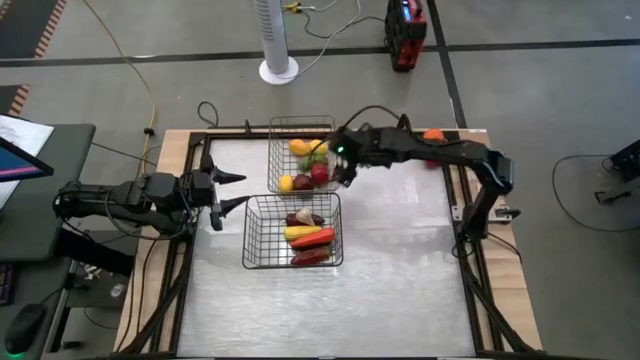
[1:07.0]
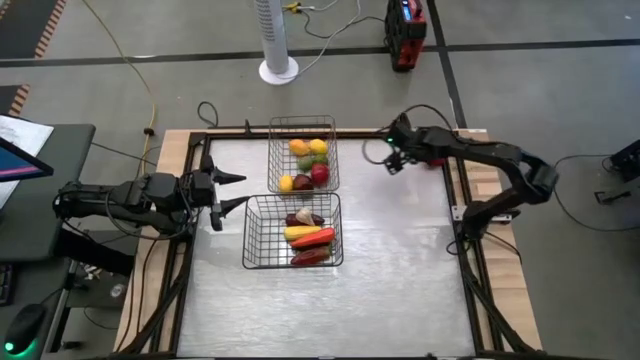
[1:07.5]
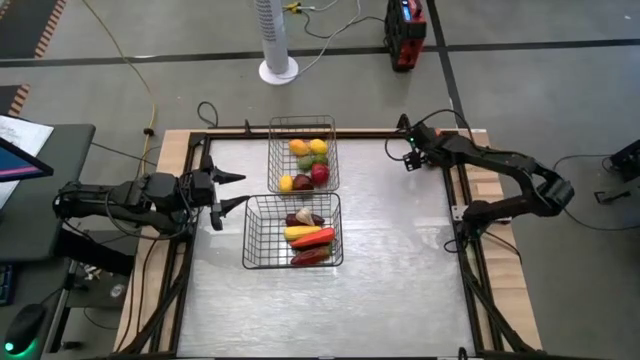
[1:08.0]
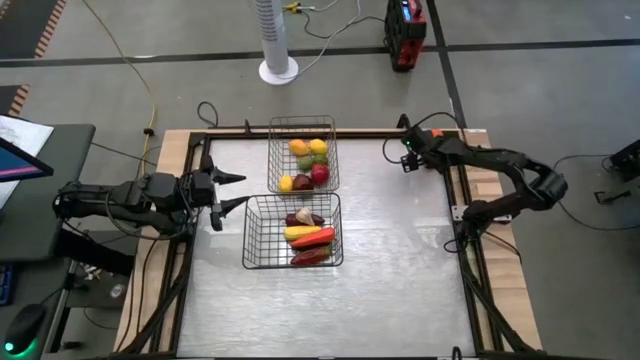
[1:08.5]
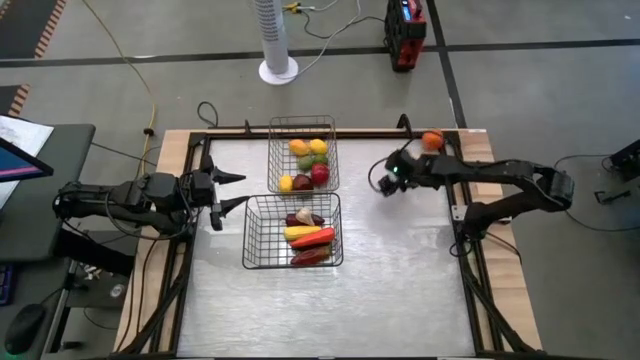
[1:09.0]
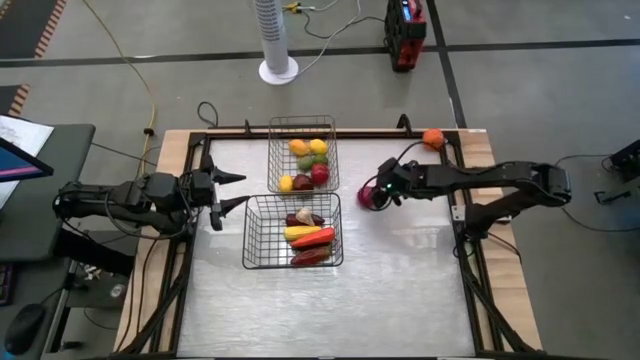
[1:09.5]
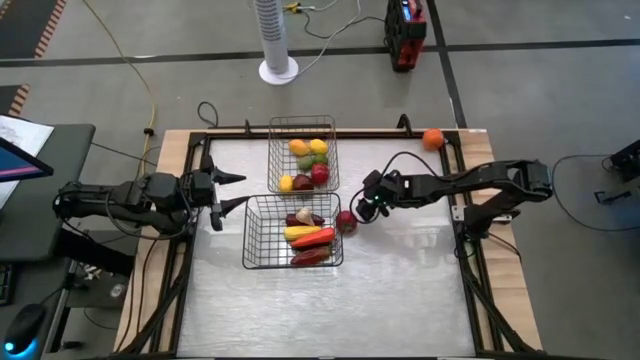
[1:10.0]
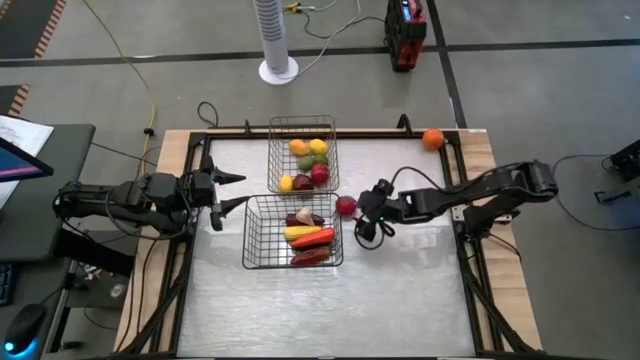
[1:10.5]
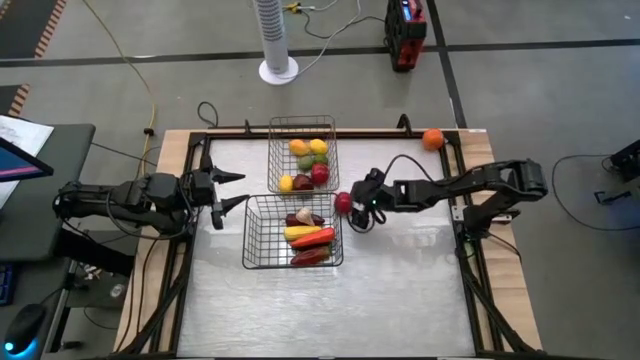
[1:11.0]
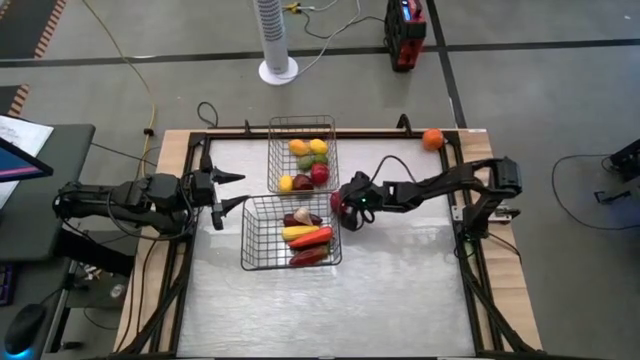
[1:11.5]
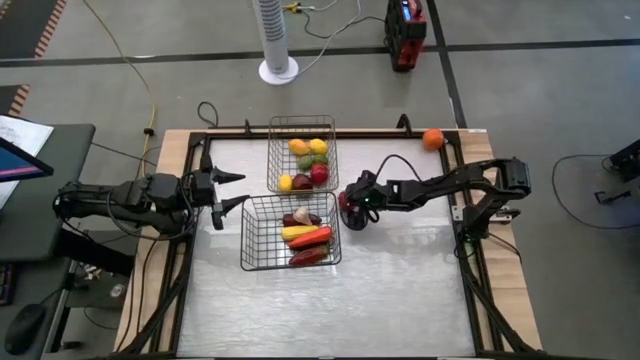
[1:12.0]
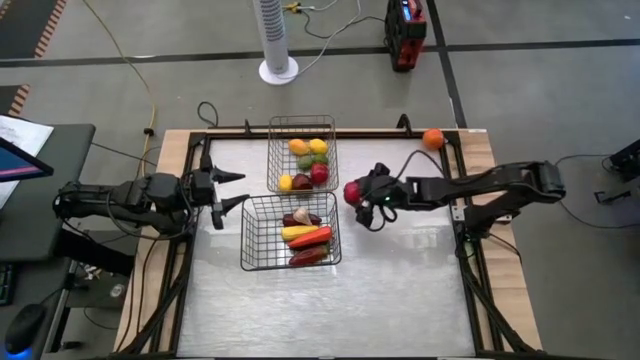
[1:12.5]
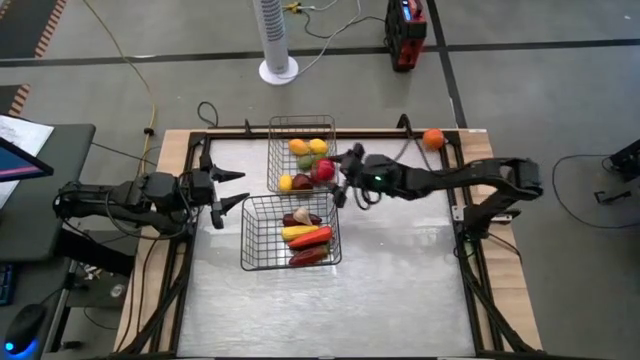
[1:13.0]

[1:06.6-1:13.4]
Task: Sort produce into baskets
Put the tomato into the gold wire basket

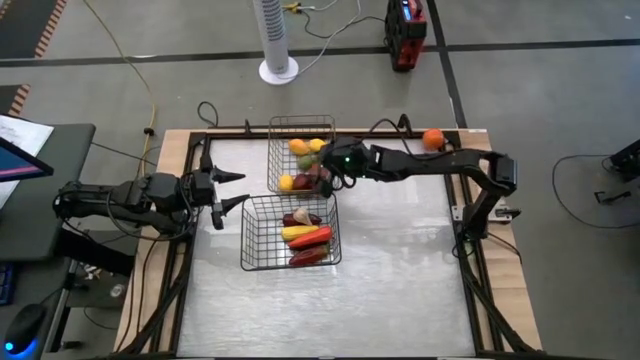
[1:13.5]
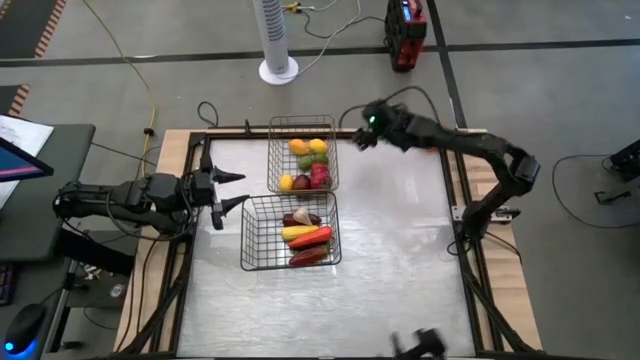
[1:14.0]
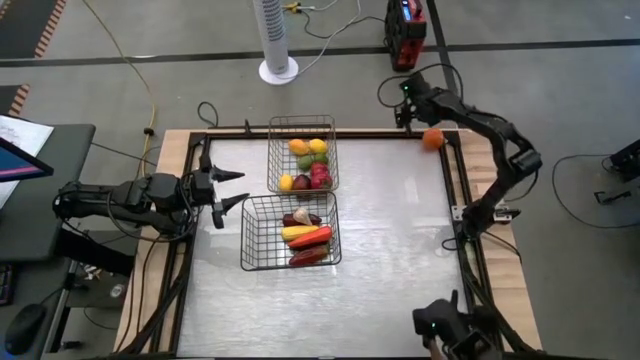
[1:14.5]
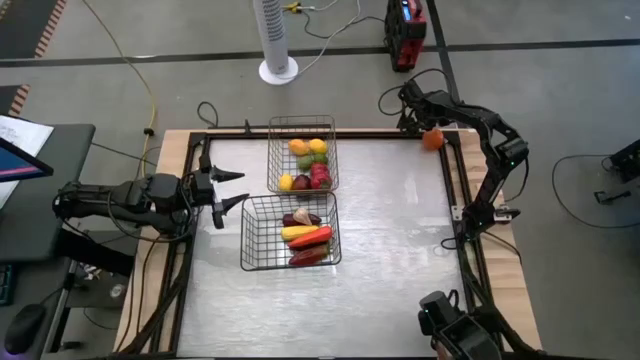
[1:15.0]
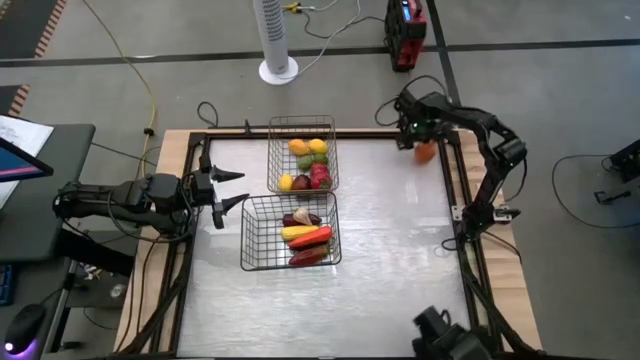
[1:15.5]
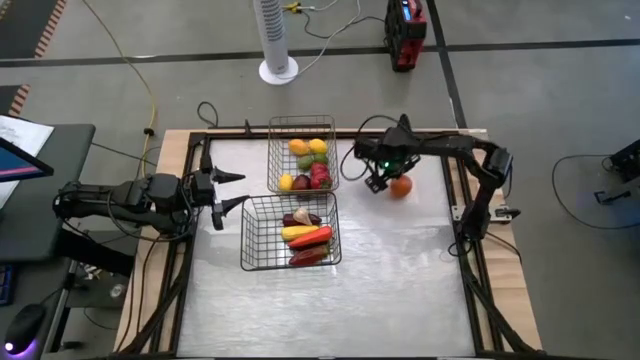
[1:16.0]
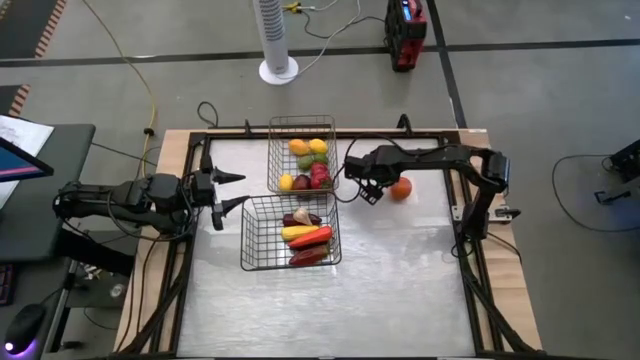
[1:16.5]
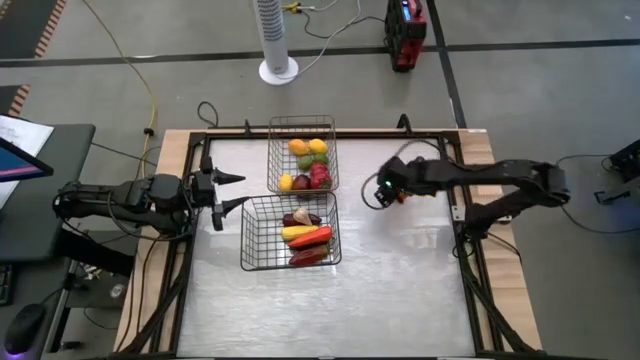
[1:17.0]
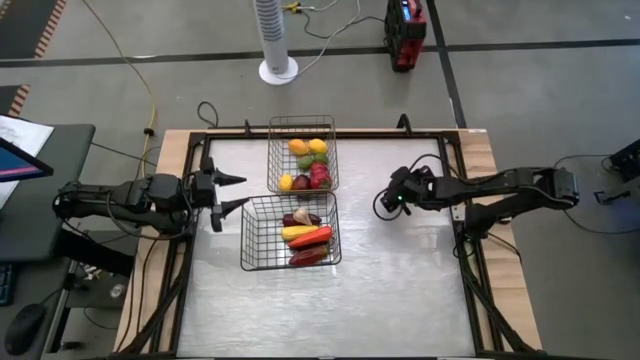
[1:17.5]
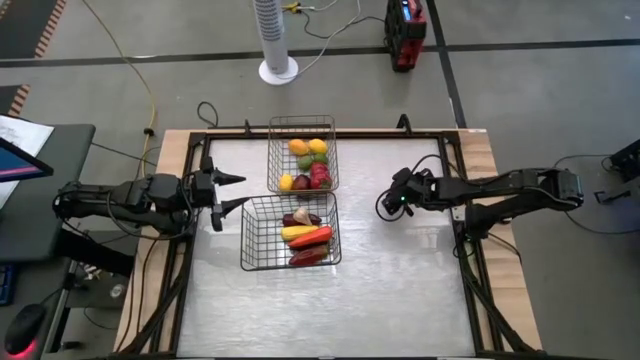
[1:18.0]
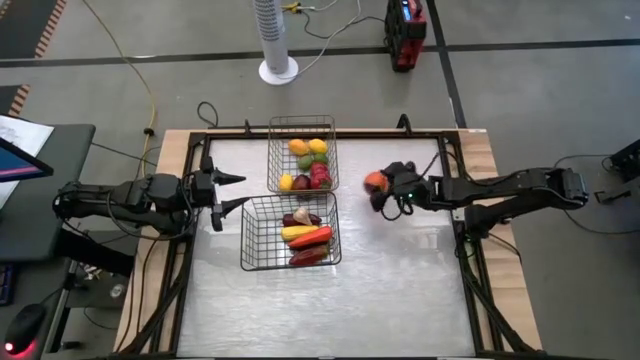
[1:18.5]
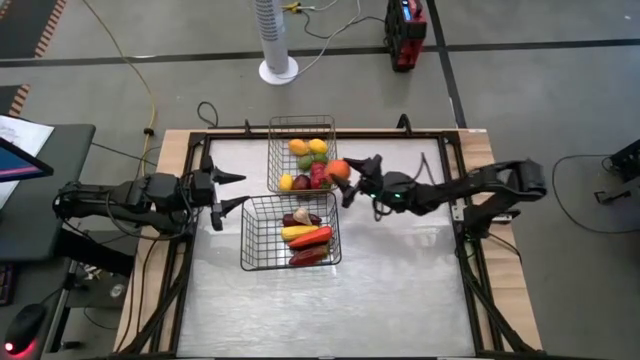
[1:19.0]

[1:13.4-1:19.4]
Put the orange into the gold wire basket

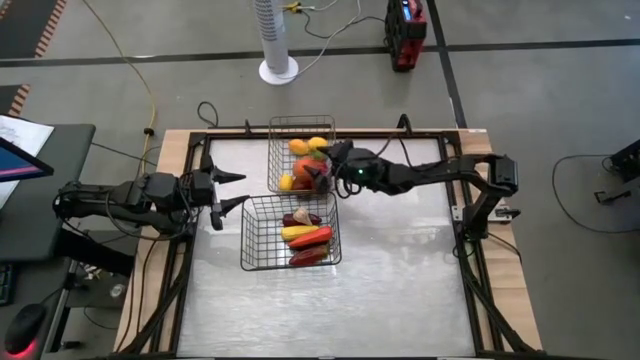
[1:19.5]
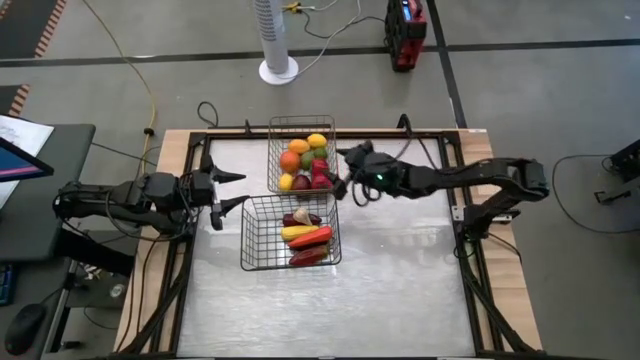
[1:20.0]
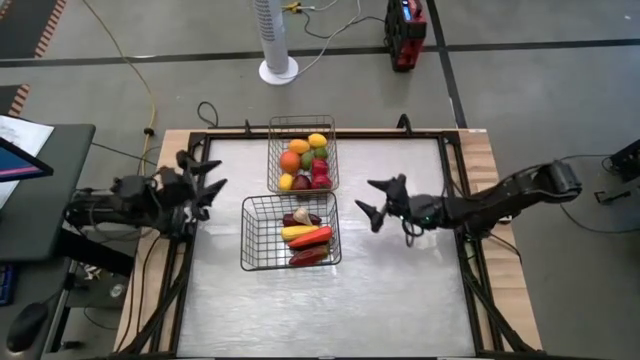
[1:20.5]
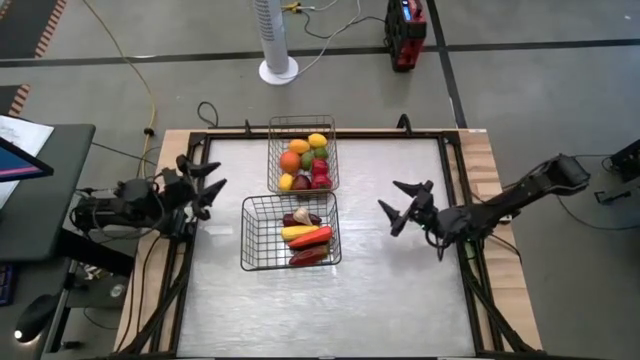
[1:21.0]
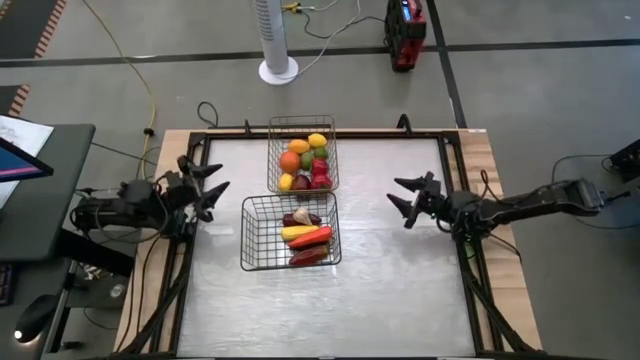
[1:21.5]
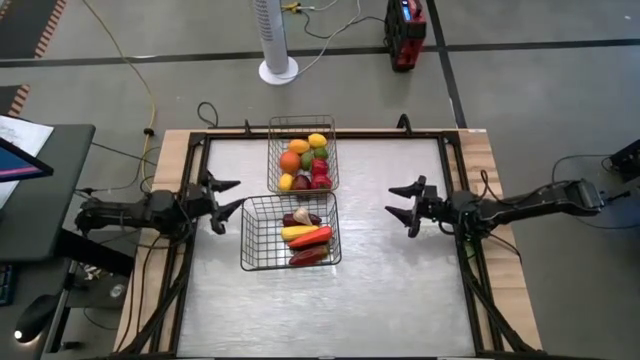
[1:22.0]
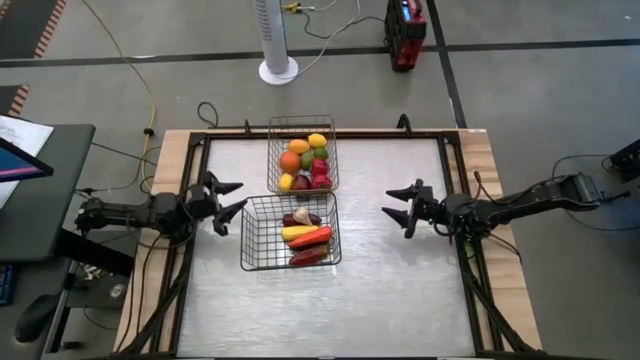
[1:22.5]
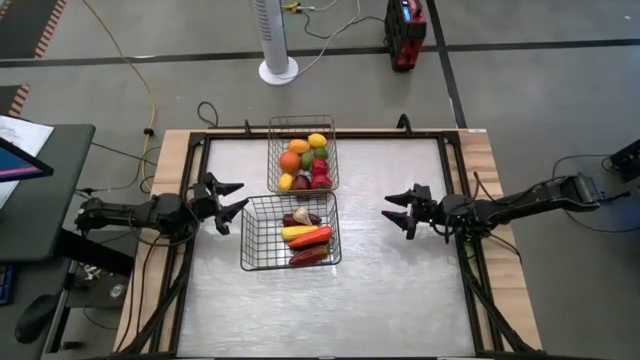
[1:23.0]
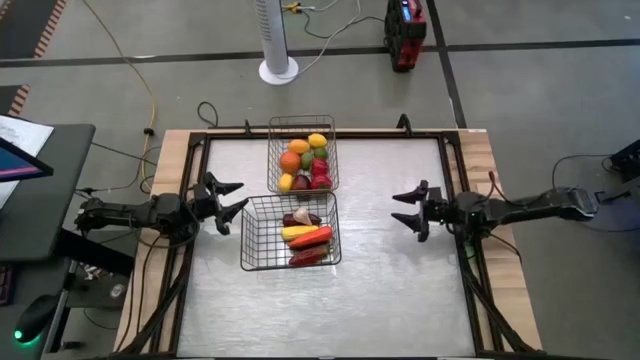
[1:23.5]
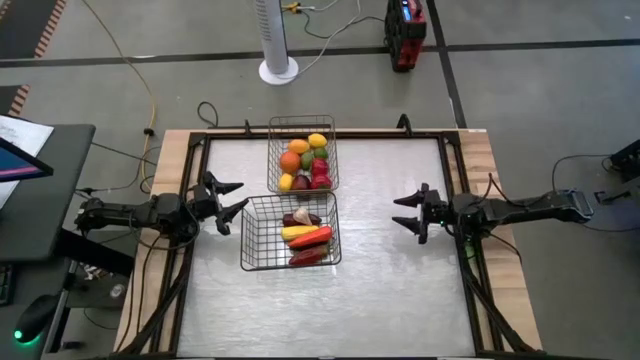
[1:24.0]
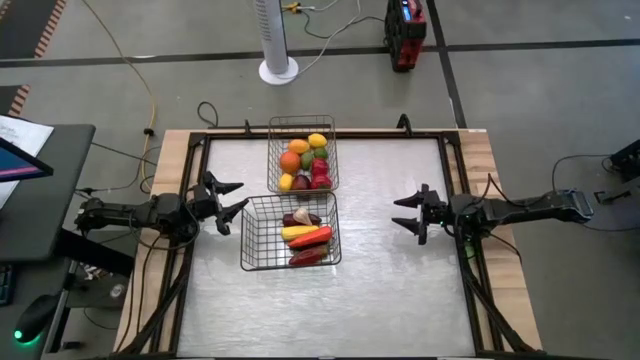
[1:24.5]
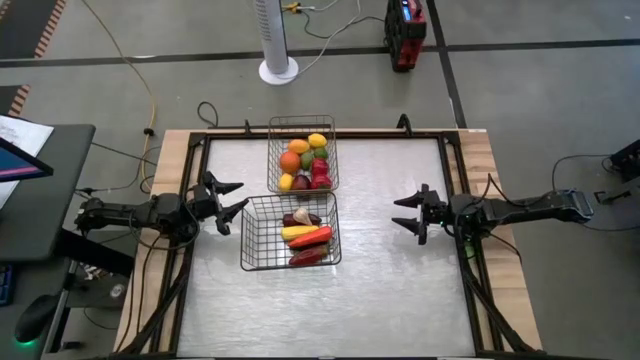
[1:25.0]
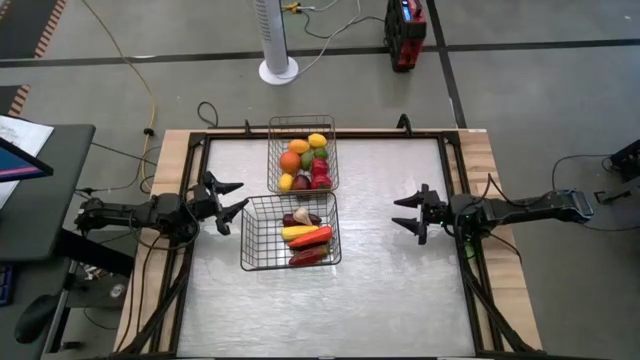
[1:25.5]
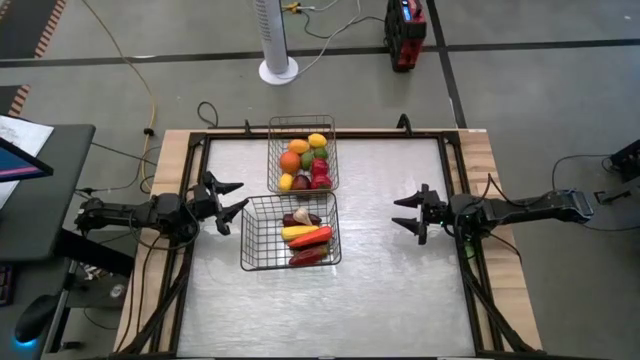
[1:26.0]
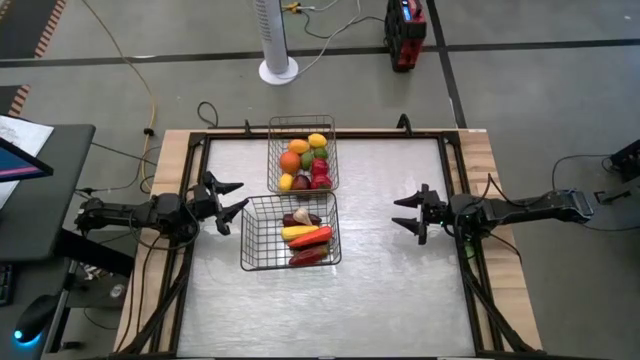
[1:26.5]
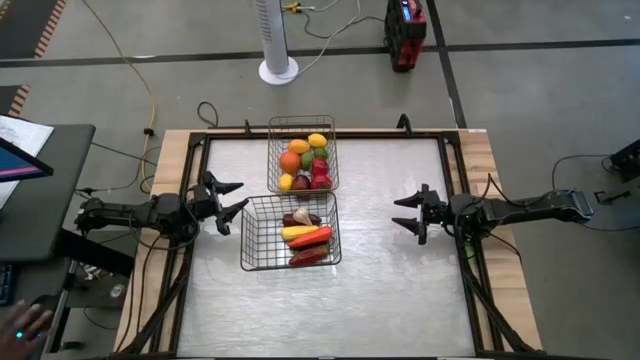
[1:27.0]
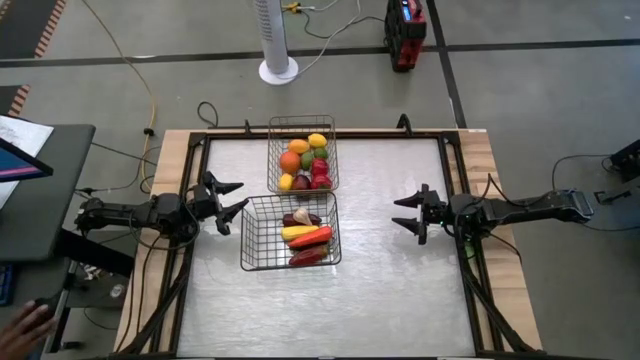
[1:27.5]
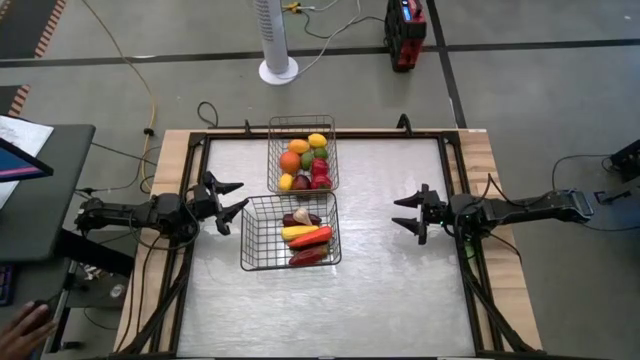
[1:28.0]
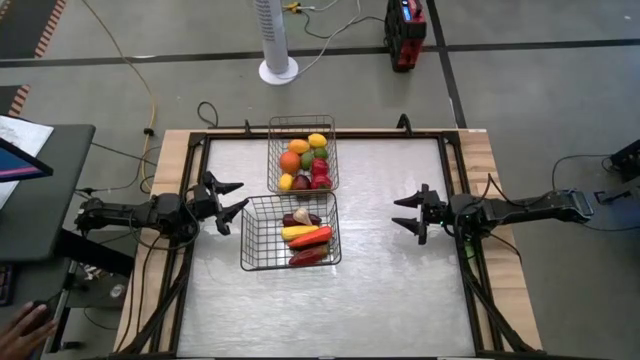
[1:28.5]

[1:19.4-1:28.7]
Return to Home Position
